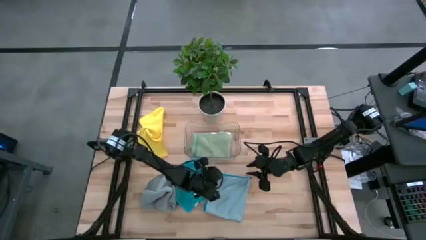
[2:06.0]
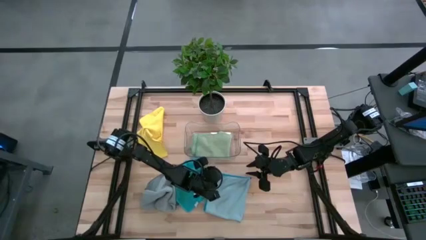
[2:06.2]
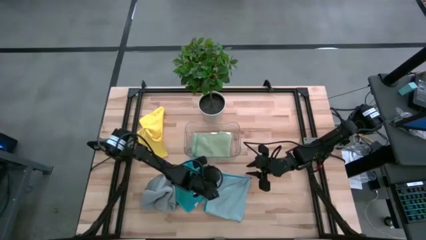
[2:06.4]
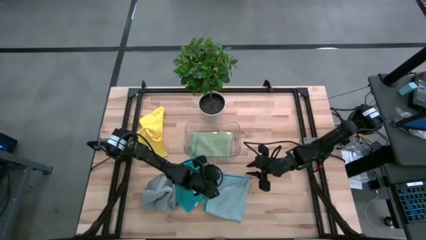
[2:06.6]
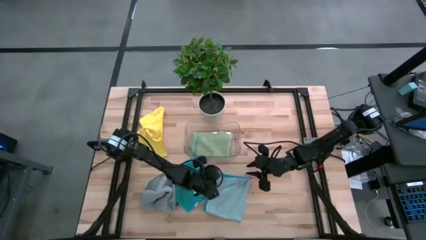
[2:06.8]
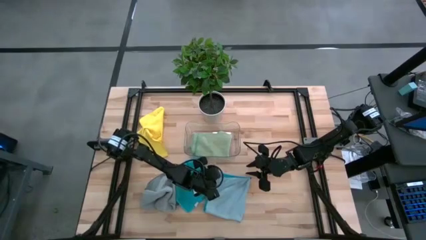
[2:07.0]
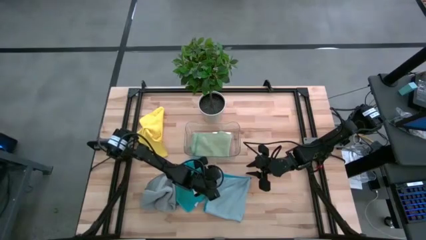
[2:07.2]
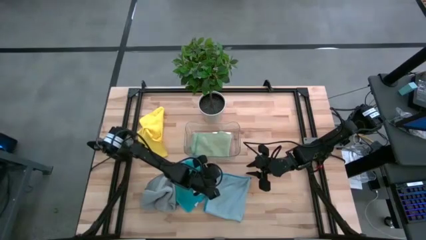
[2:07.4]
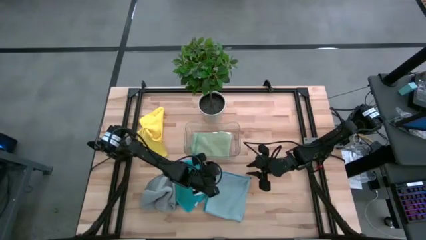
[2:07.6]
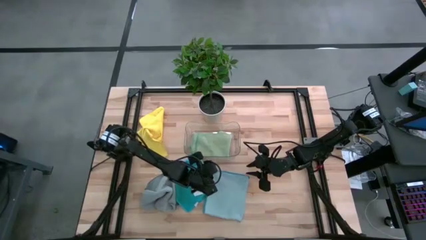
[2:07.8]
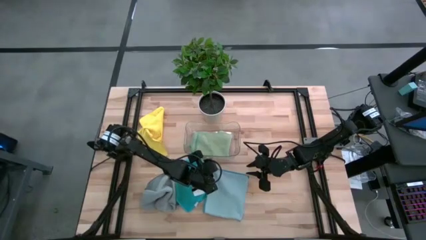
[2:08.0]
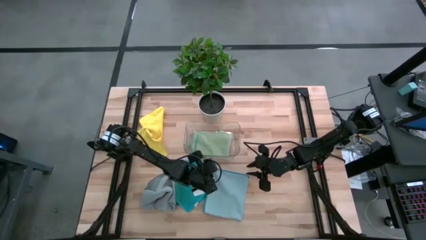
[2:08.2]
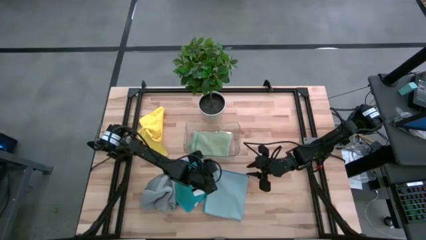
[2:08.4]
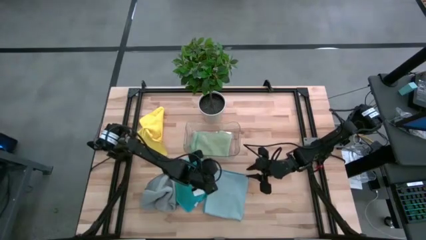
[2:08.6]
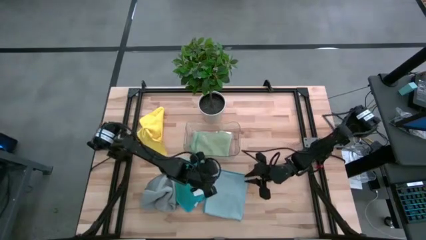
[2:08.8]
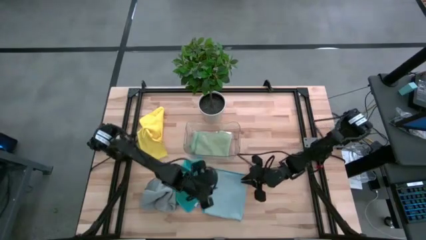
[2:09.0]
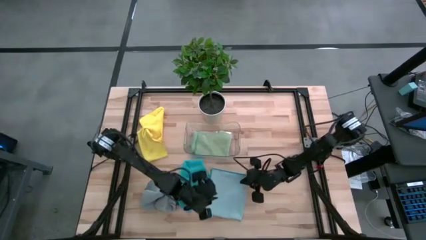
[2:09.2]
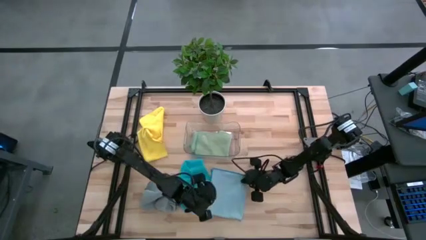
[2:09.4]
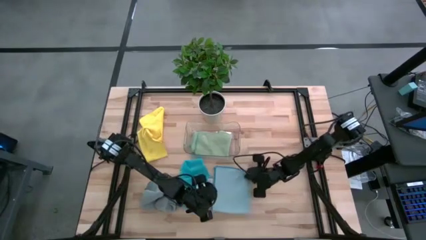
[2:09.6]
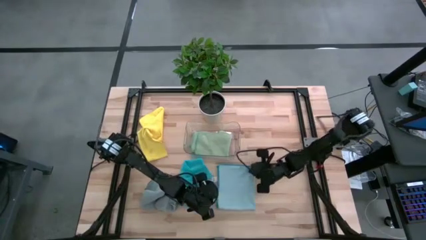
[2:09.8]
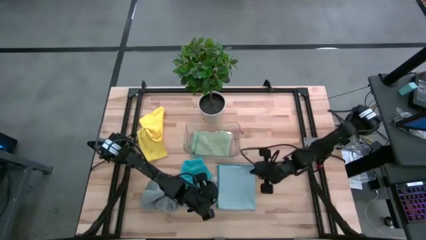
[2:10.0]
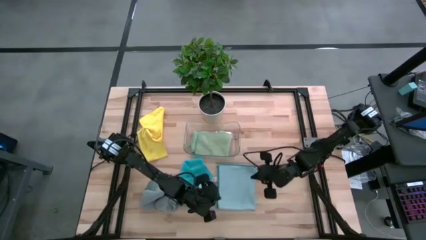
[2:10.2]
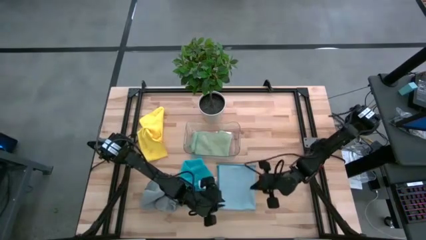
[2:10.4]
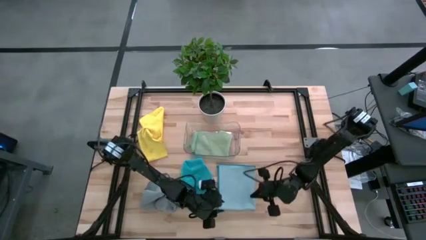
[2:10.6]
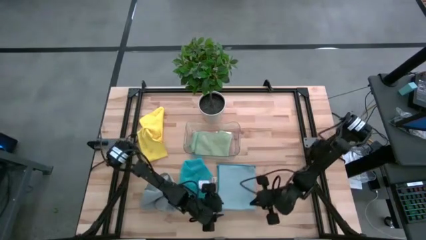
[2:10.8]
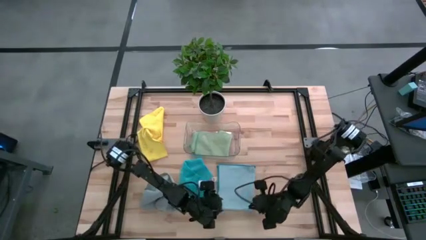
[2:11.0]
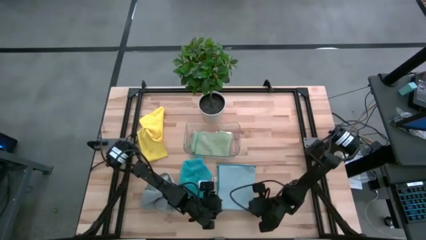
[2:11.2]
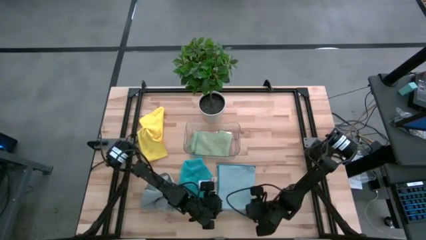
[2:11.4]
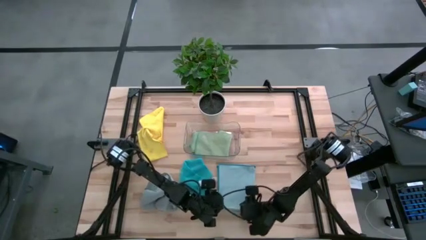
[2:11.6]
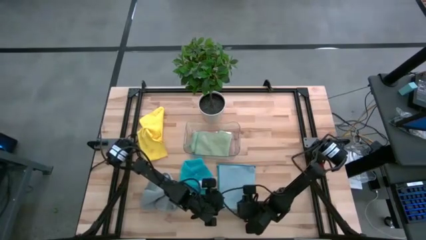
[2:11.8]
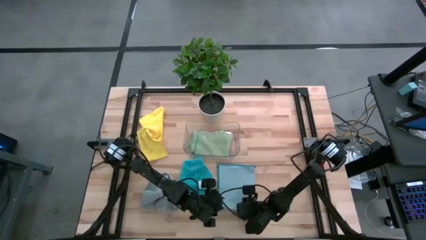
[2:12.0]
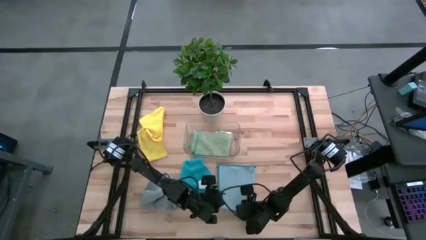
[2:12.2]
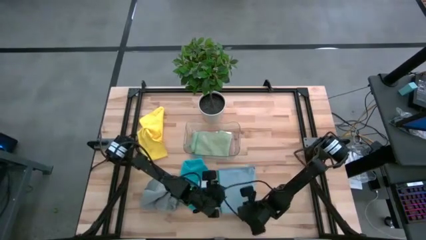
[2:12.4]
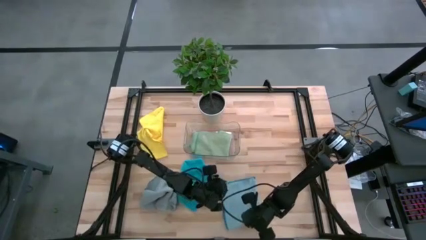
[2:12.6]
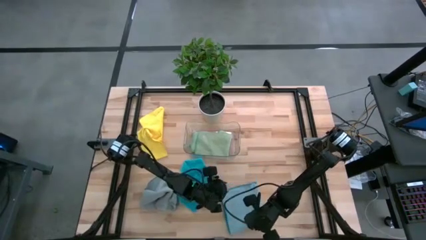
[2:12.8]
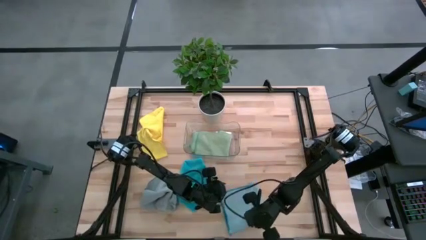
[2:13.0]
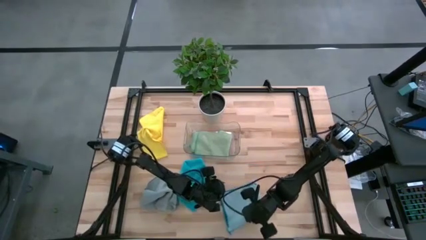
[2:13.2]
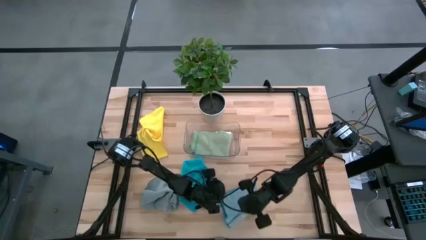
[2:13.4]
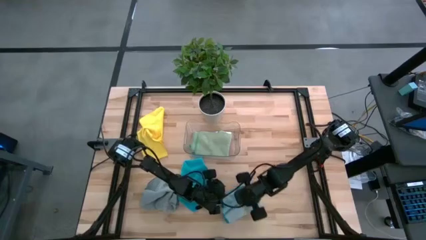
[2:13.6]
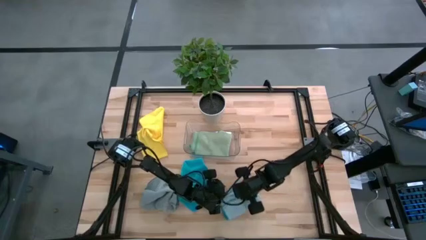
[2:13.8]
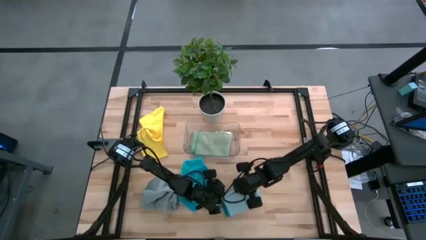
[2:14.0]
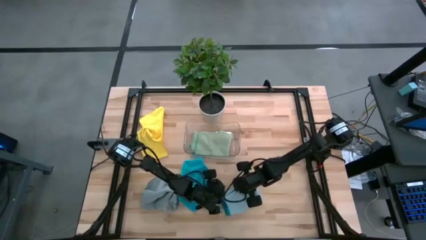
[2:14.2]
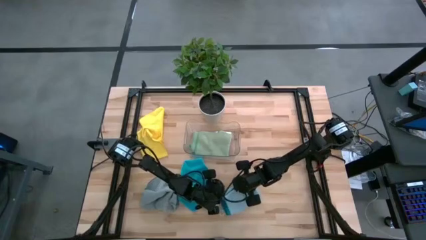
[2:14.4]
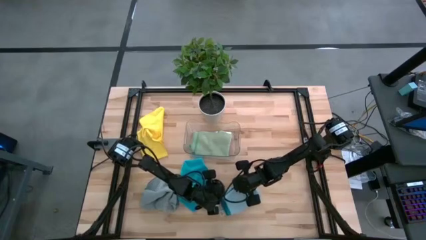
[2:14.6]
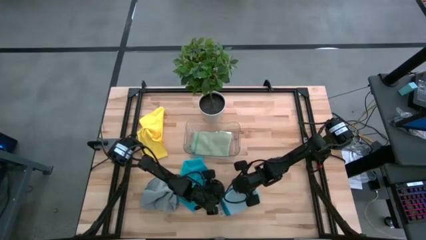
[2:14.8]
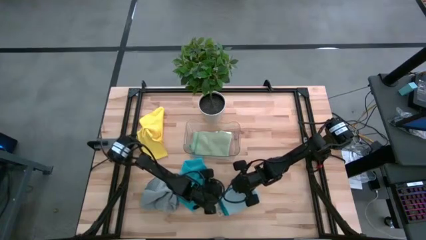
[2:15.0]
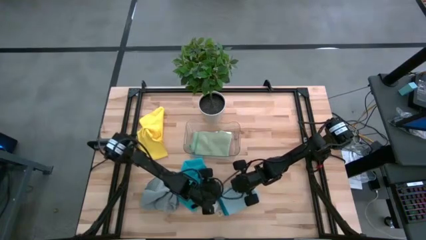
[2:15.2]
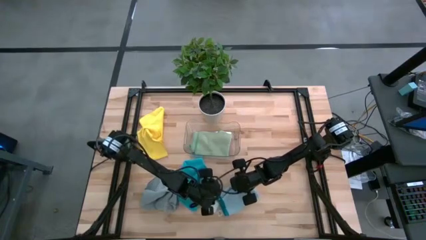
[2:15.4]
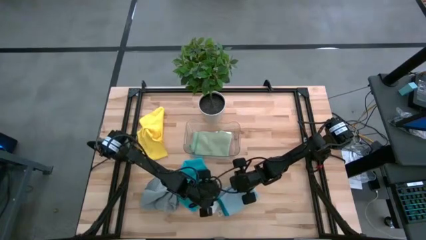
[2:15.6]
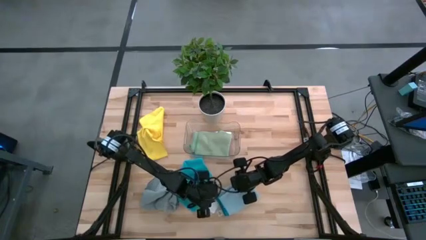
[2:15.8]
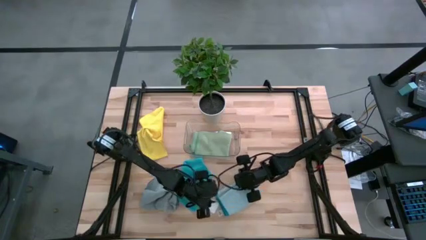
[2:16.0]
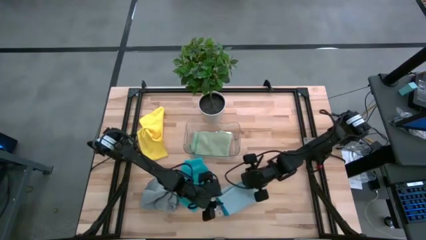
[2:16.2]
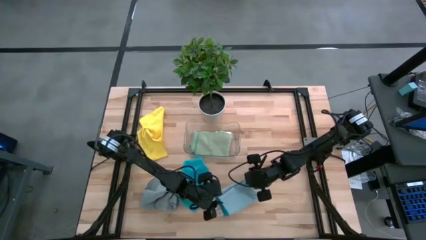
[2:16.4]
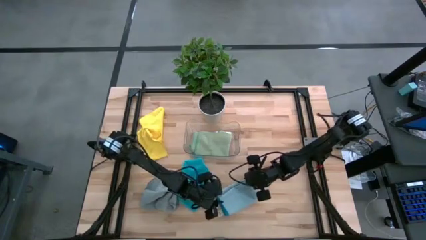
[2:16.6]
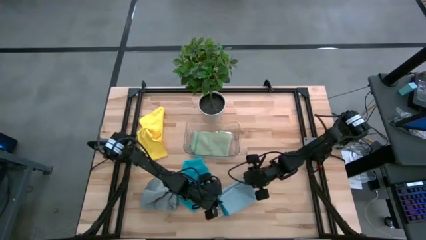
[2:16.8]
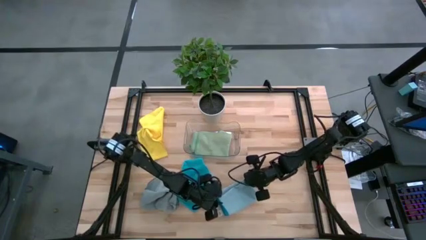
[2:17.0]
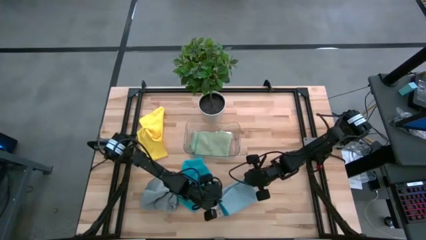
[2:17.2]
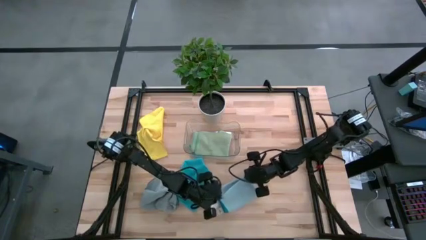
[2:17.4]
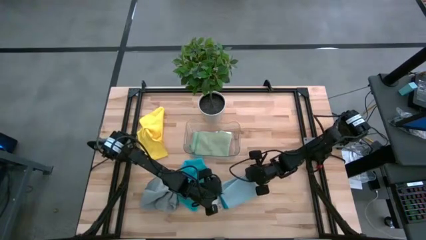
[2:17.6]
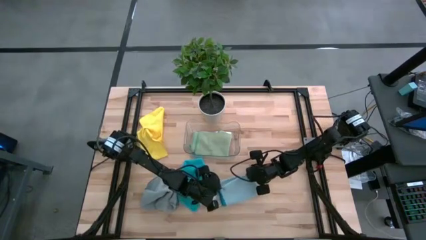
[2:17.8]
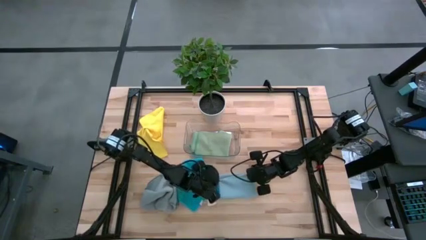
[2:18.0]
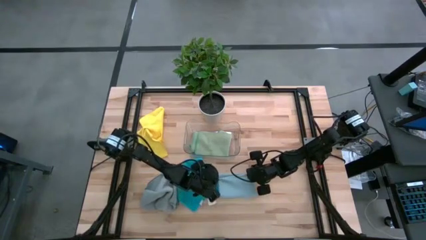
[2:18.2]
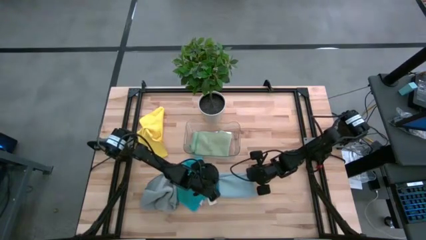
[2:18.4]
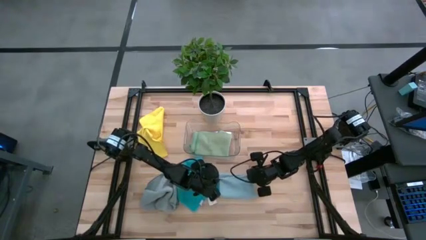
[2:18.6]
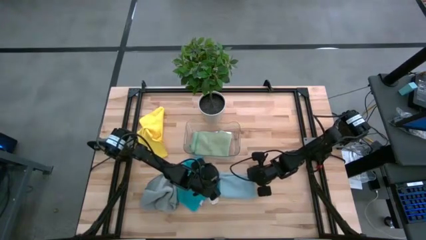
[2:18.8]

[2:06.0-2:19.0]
Task: Fold microfiber towels
Fold the light blue microfiber cloth
